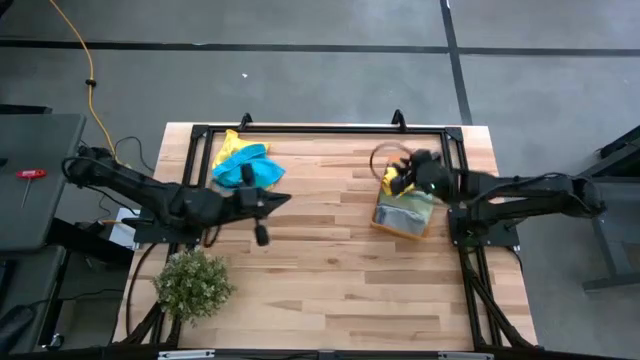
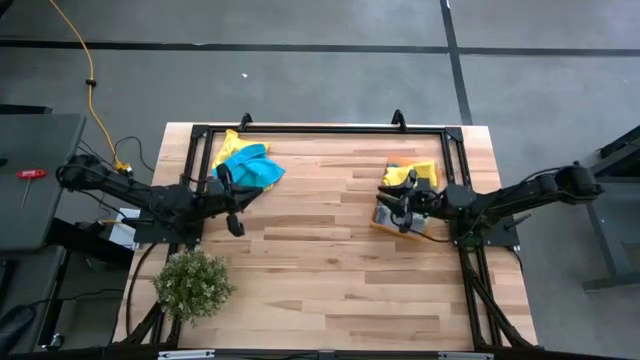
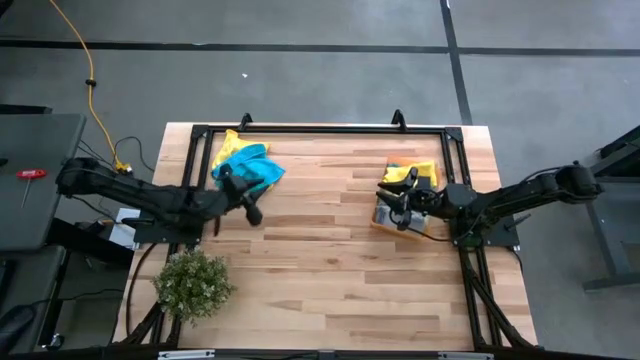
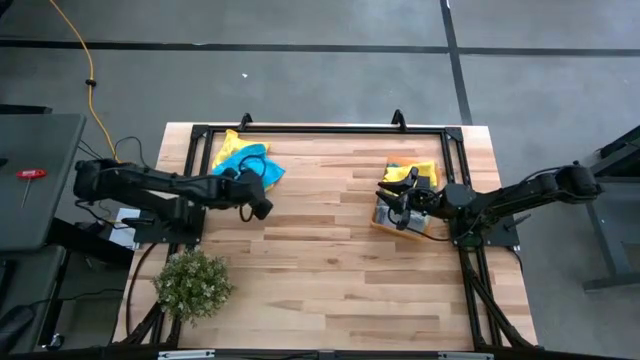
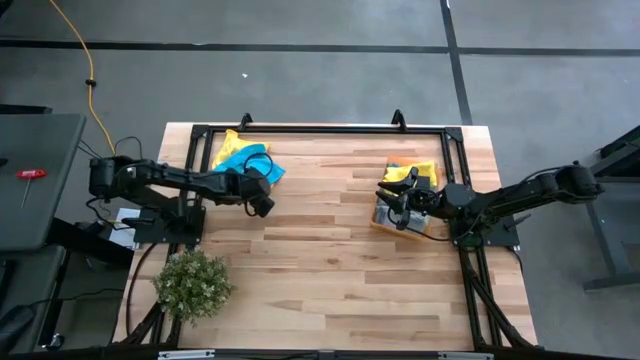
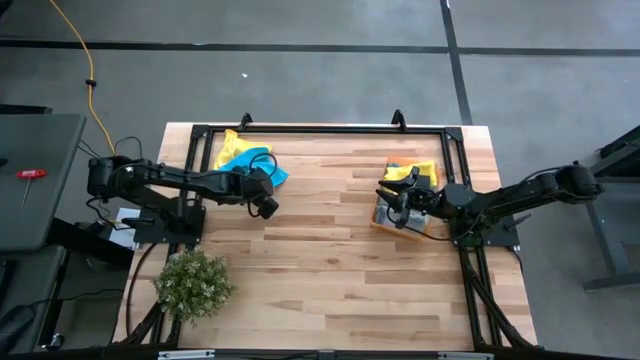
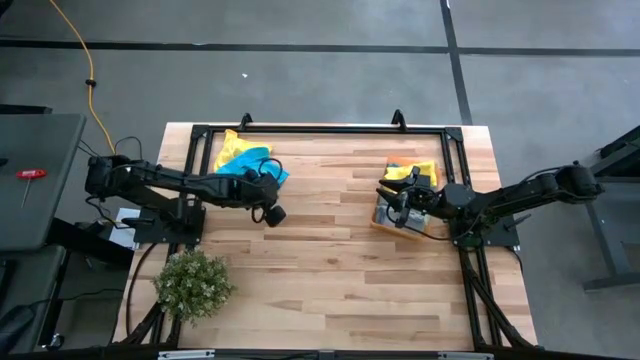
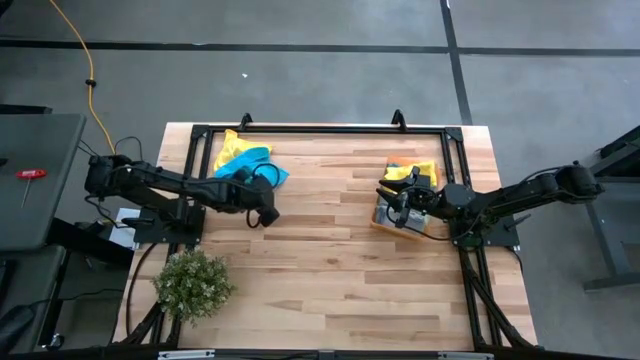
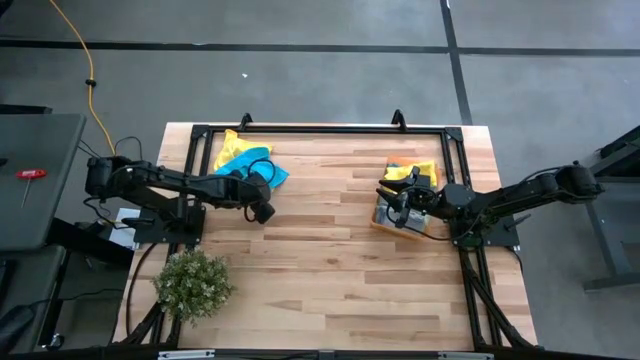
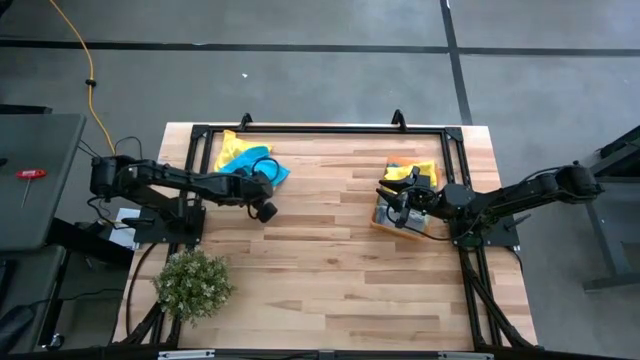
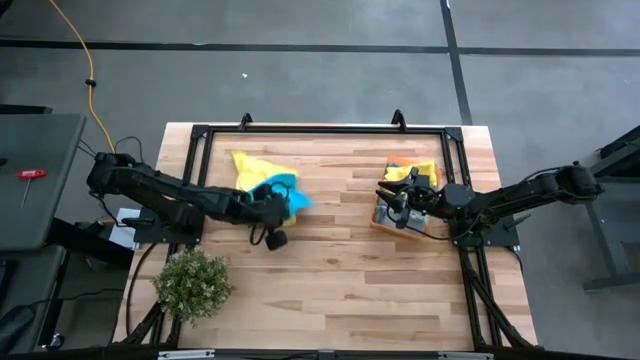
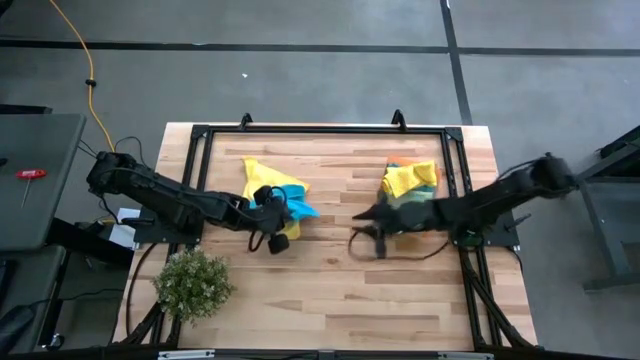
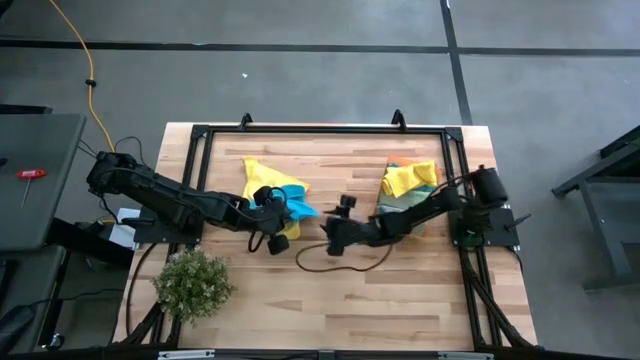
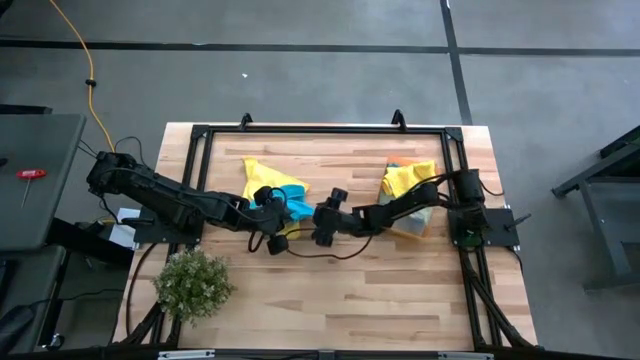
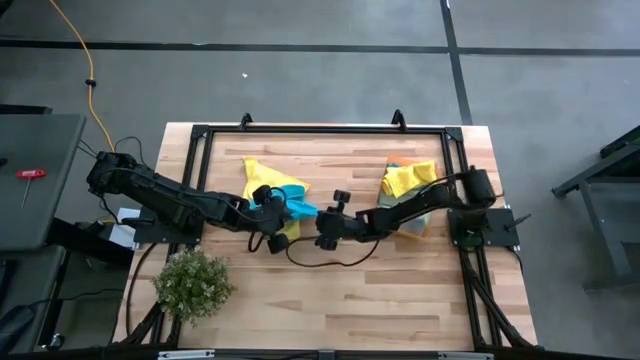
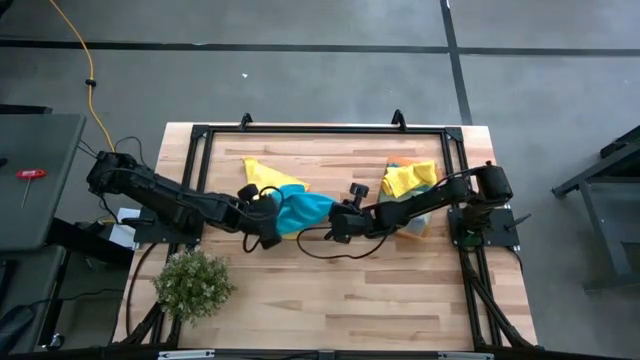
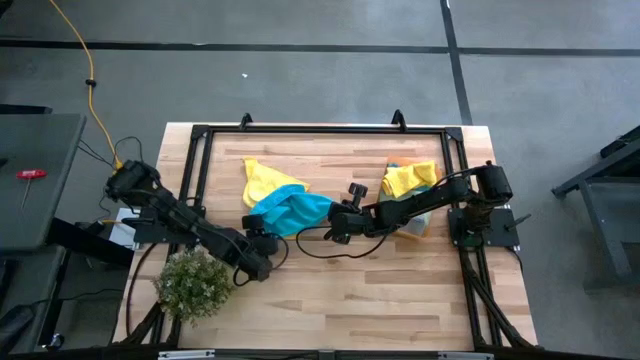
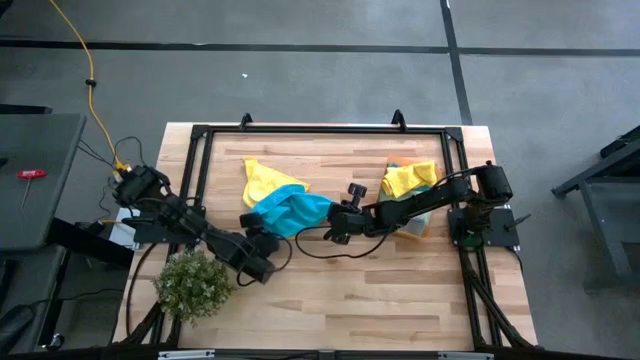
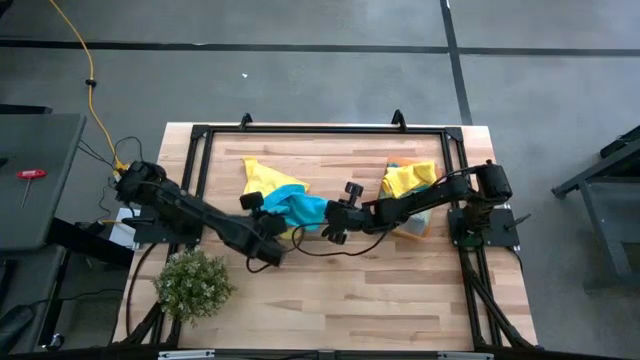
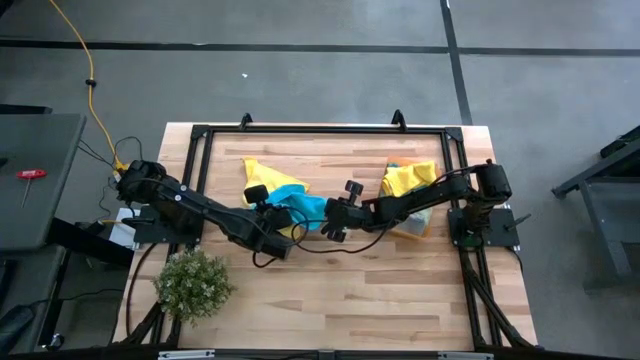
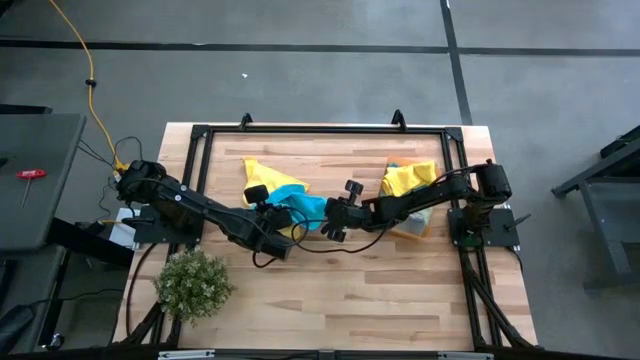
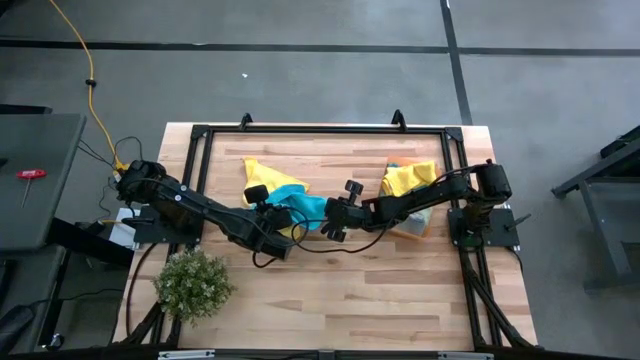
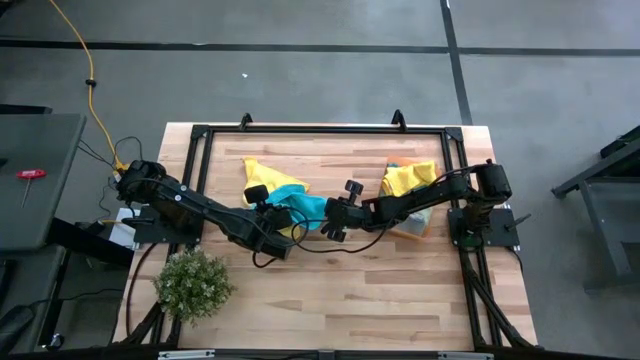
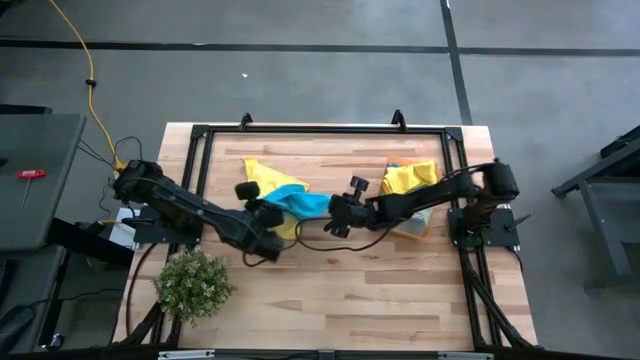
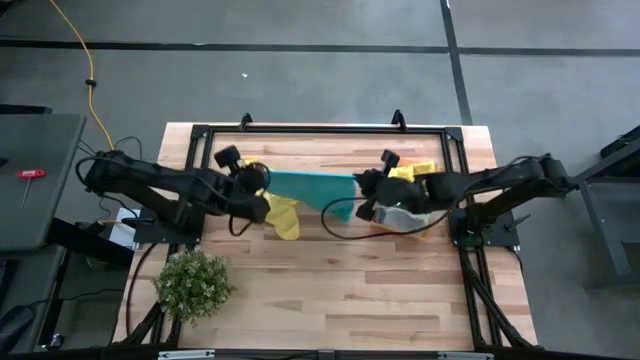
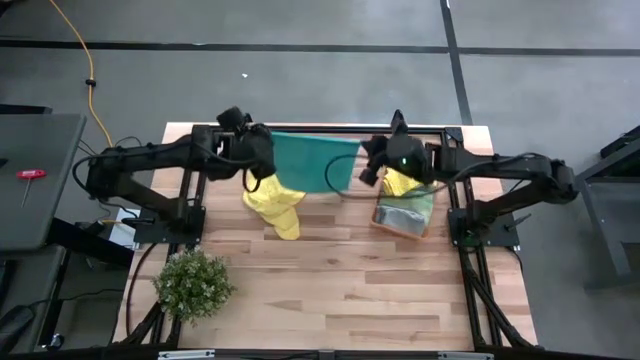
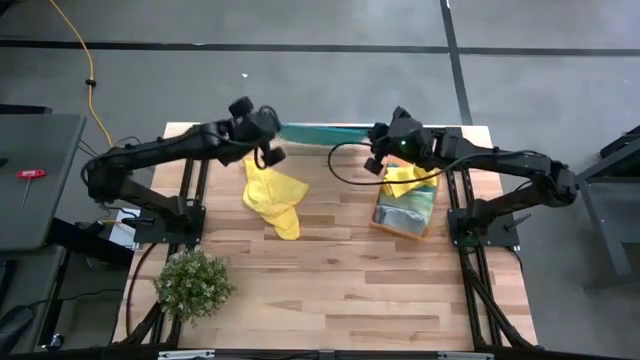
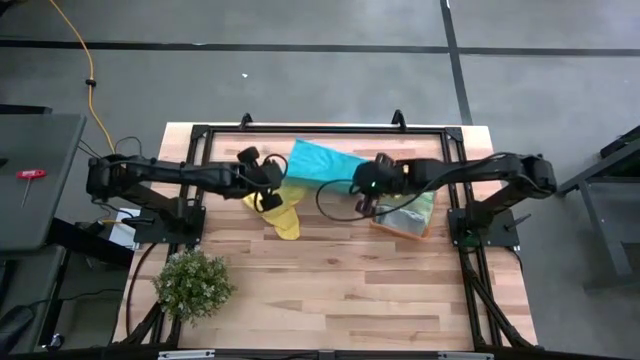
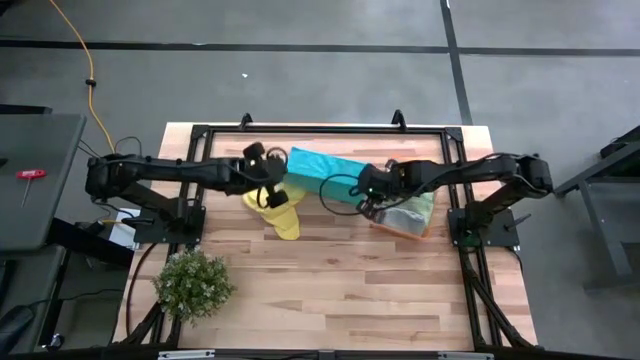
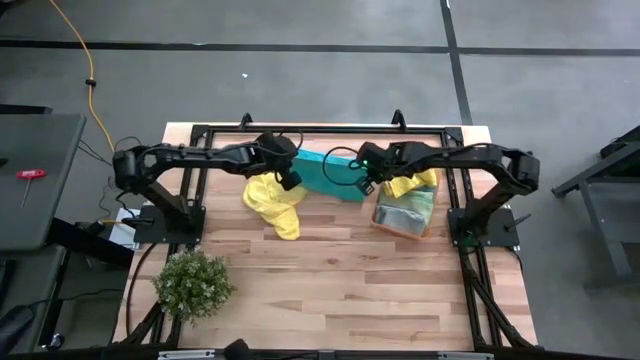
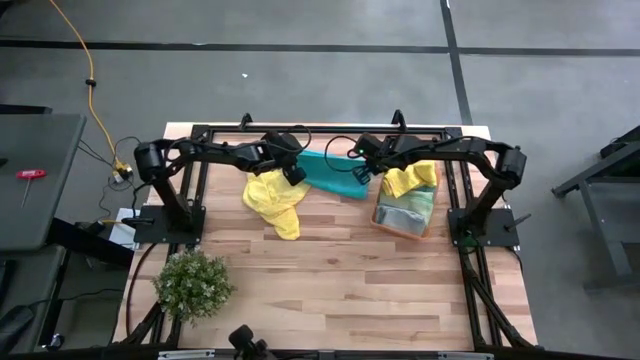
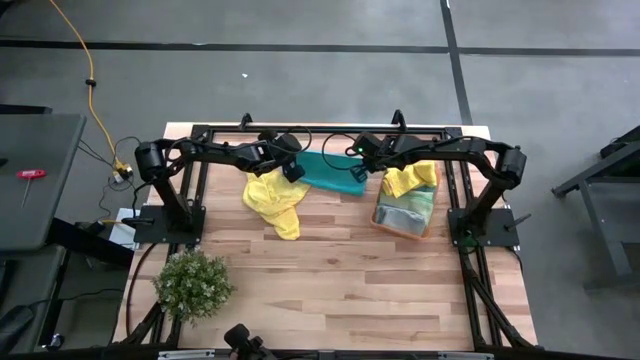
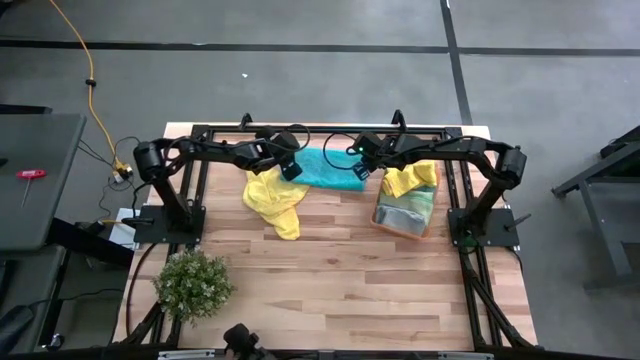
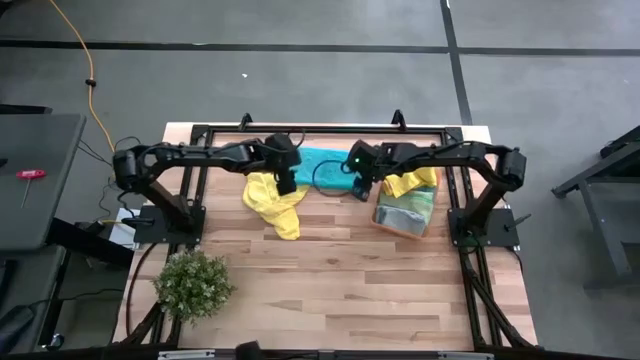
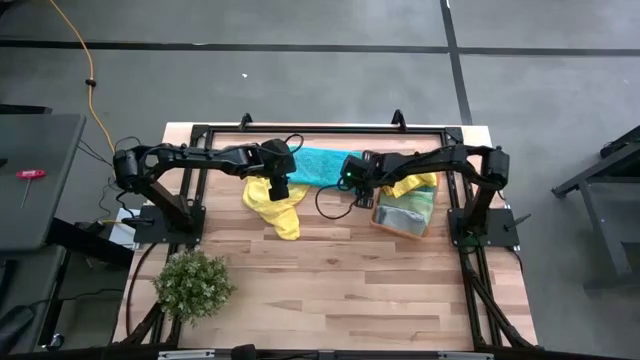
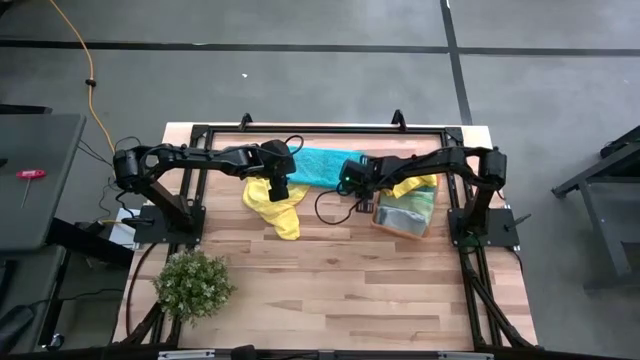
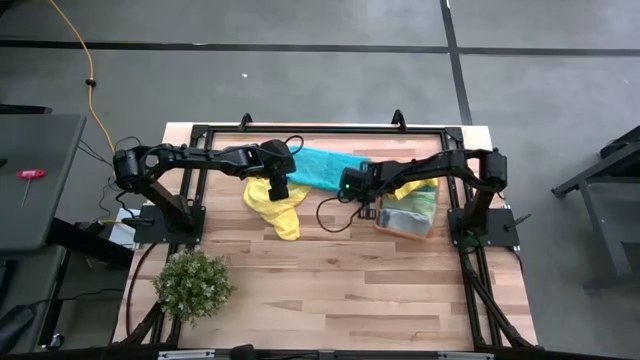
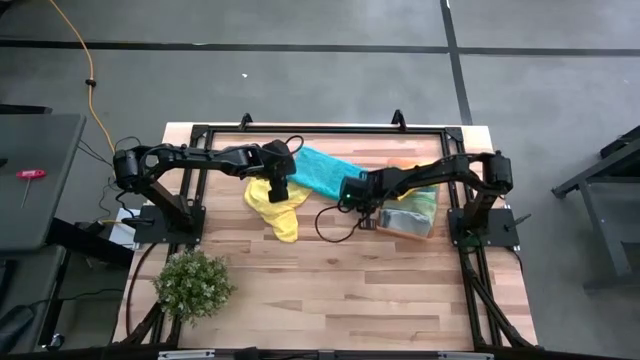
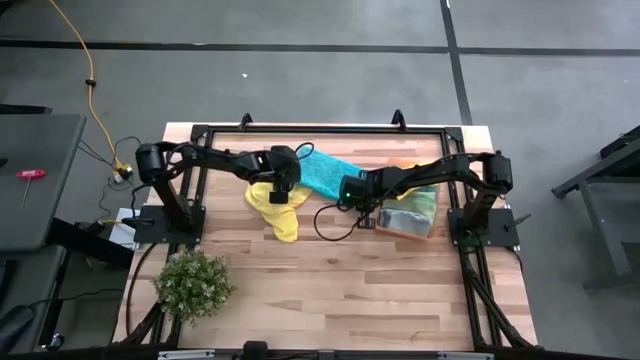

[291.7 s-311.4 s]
Task: Fold microfiber towels
Fold the blue microfiber cloth
